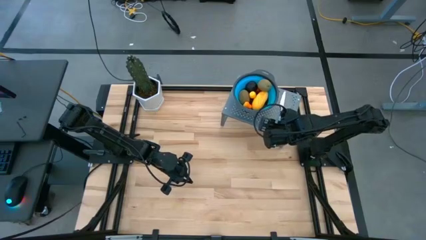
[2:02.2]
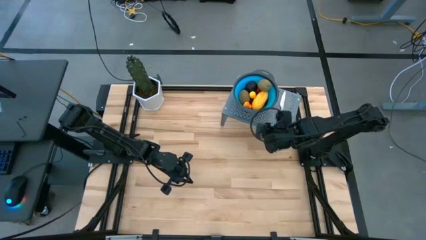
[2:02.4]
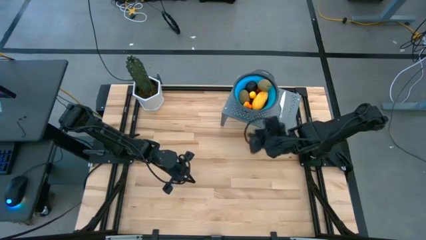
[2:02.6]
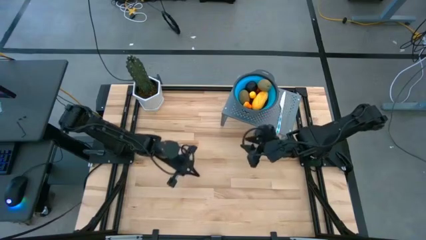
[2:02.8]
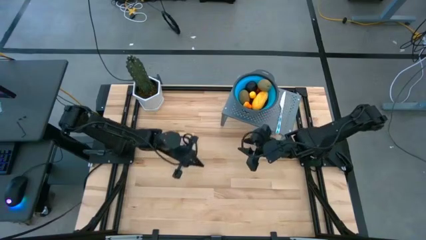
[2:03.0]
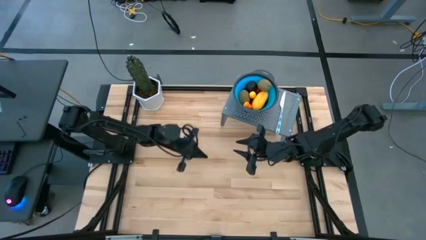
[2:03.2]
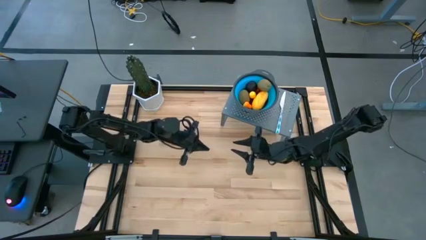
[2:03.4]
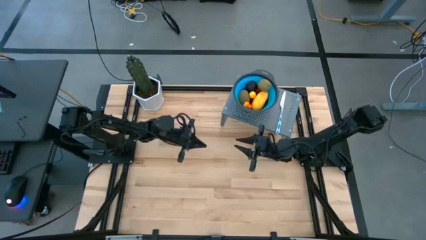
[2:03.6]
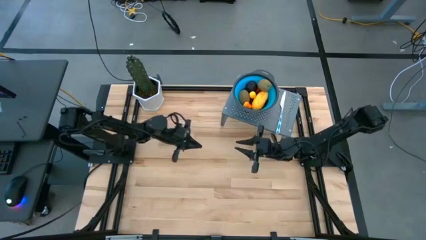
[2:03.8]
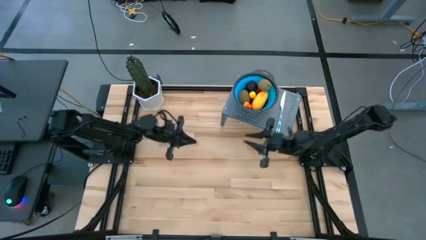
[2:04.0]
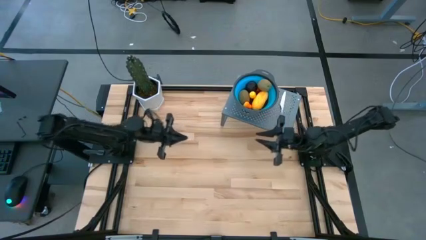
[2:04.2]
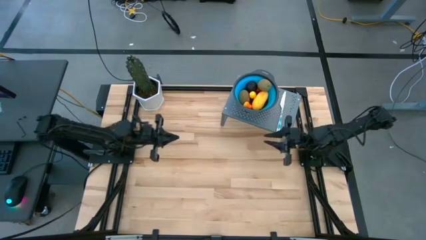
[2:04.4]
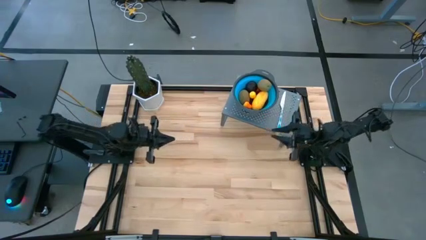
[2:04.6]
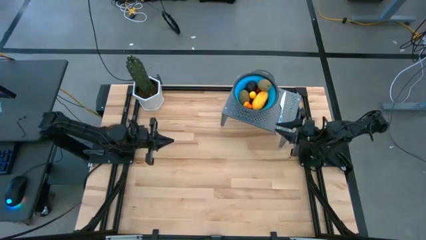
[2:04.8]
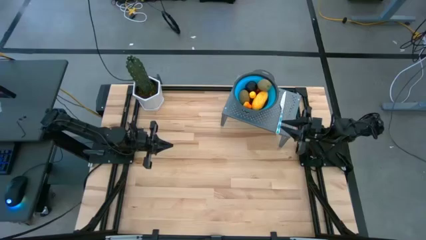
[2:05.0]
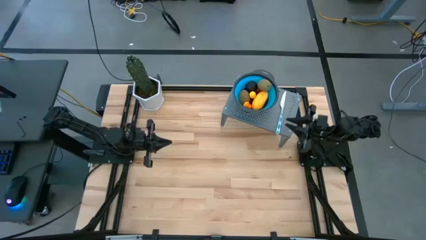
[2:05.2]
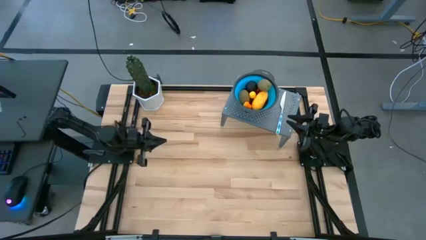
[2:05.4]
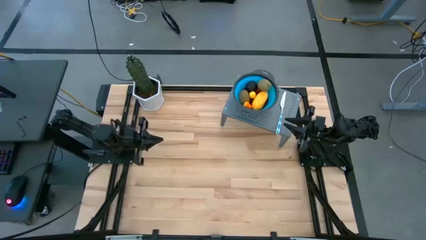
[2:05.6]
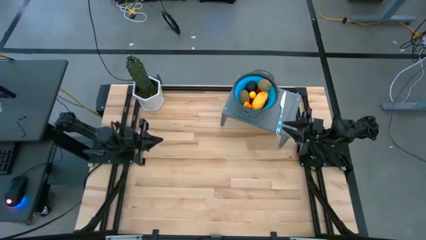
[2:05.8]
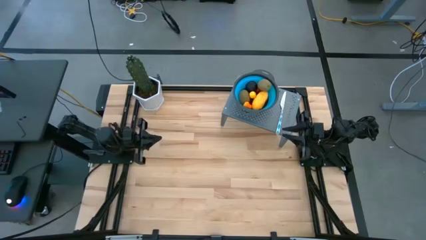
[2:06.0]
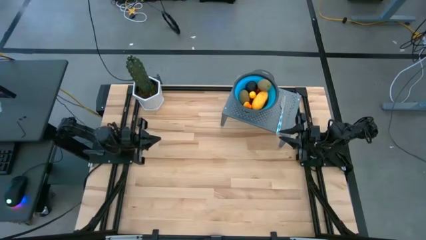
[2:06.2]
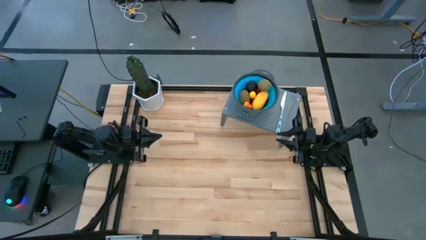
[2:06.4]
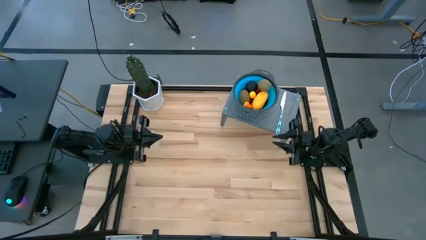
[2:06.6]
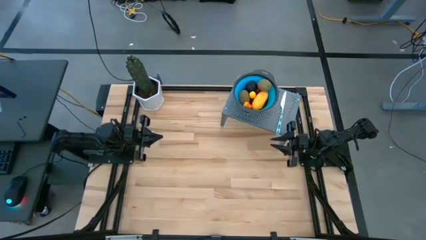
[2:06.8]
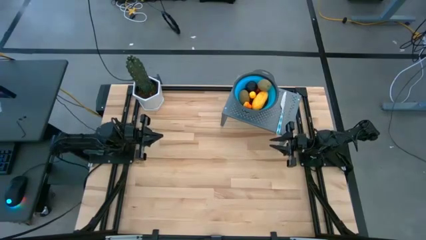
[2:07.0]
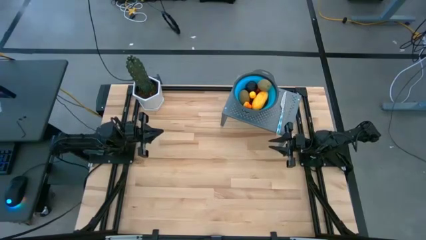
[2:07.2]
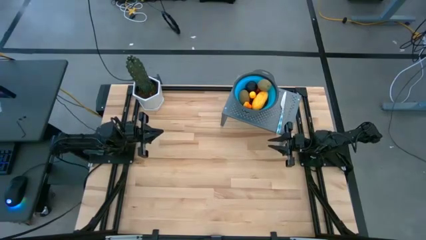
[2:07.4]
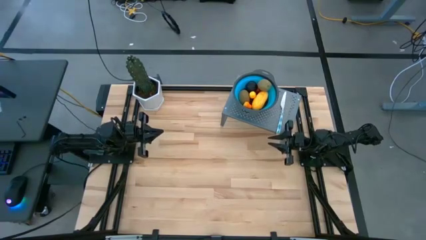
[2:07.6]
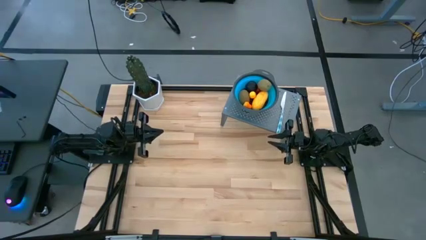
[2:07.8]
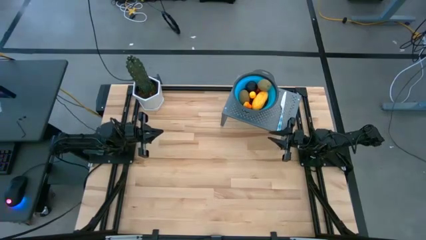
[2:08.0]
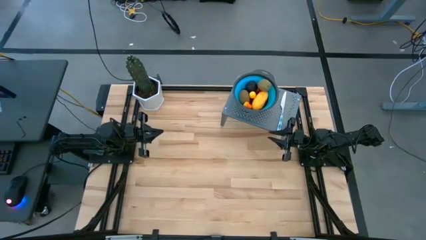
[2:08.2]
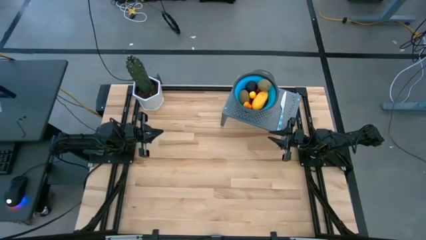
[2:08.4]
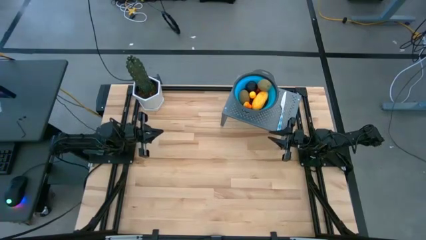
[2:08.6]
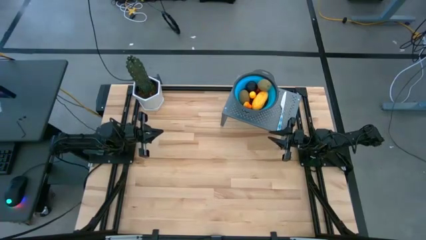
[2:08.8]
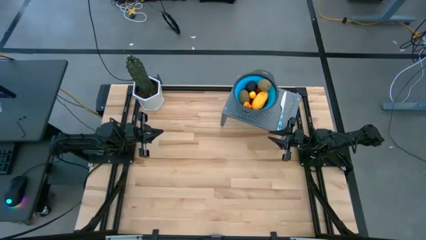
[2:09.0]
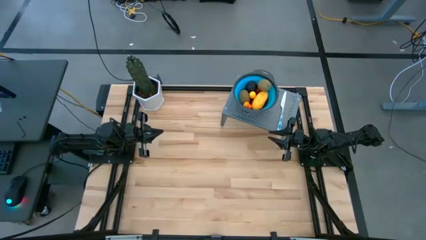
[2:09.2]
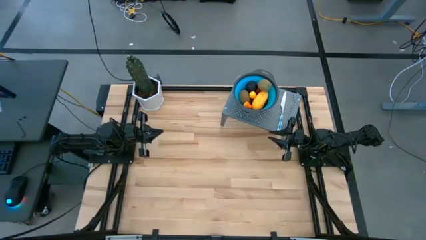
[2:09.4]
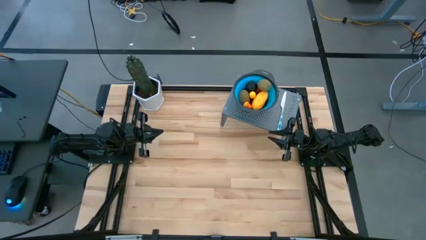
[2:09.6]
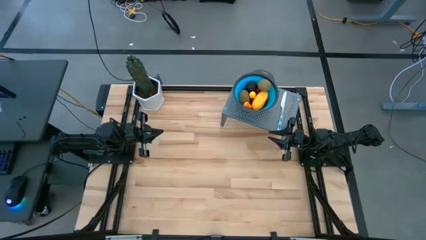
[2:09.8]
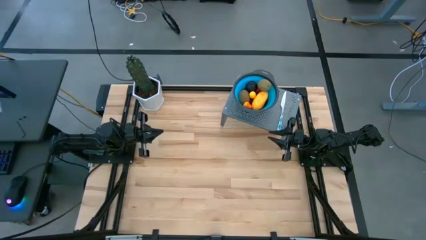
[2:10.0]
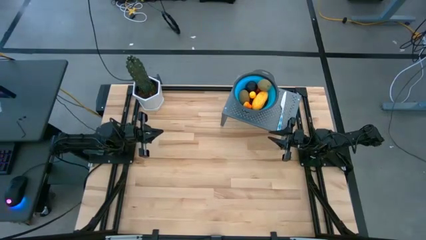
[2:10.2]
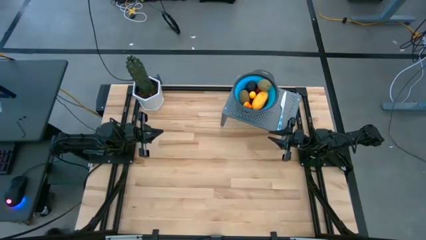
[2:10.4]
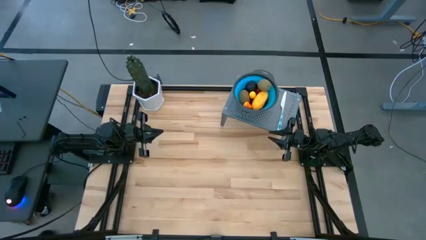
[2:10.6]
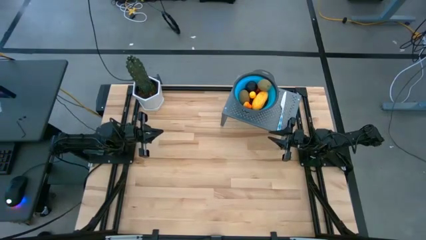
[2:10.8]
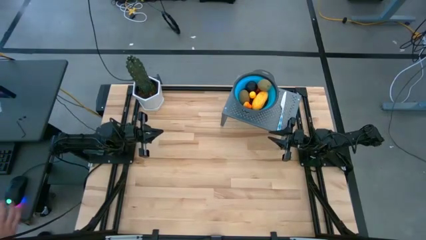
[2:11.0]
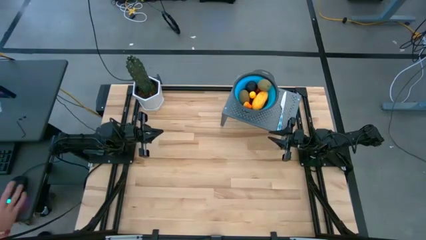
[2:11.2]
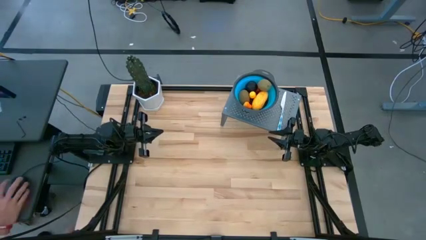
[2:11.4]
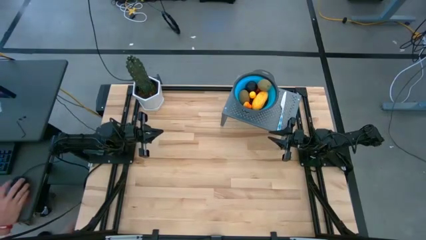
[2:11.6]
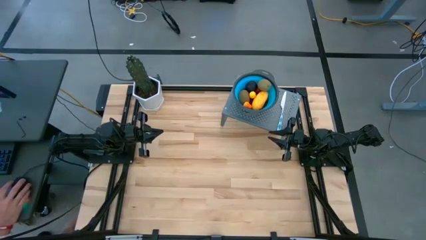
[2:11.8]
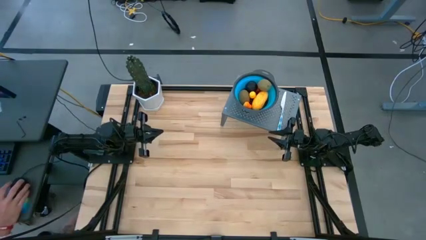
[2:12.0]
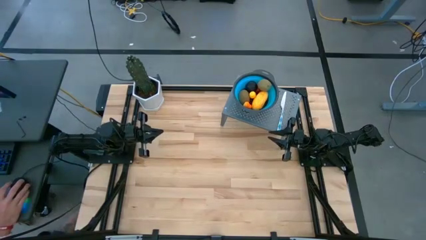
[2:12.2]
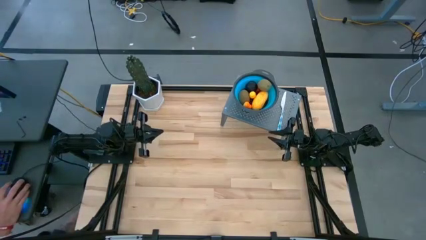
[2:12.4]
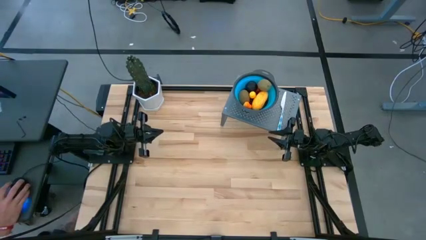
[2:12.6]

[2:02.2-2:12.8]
Task: Pick & Place Fruit
Return to Home Position

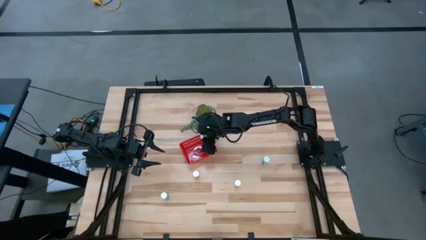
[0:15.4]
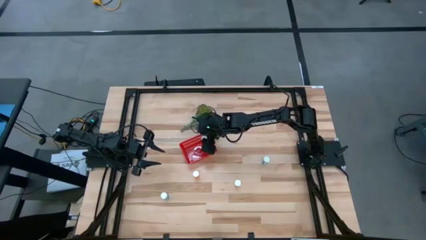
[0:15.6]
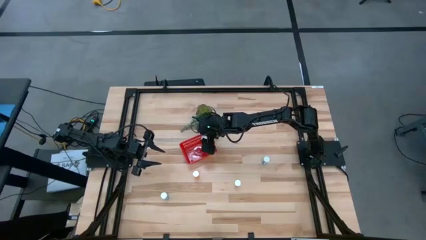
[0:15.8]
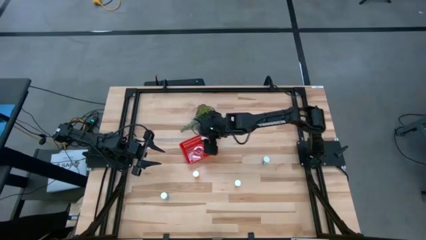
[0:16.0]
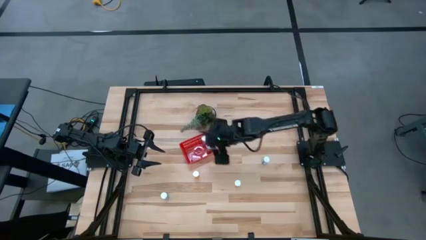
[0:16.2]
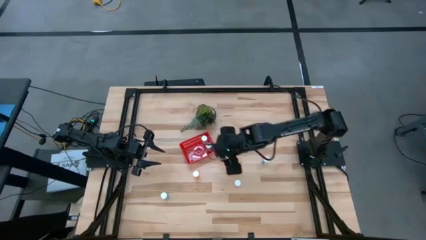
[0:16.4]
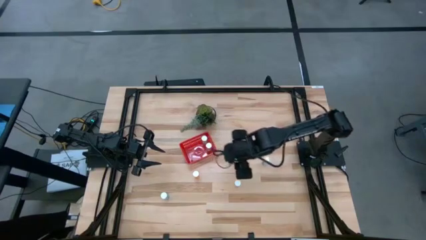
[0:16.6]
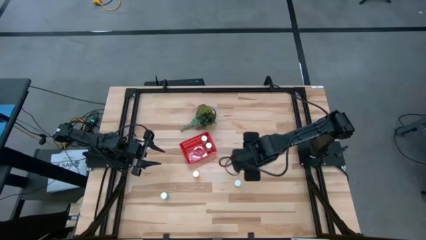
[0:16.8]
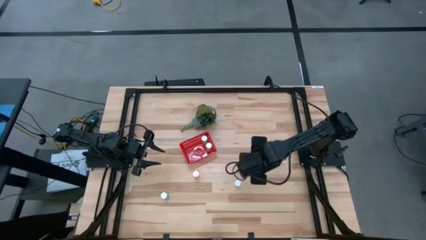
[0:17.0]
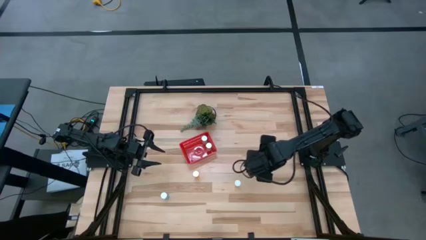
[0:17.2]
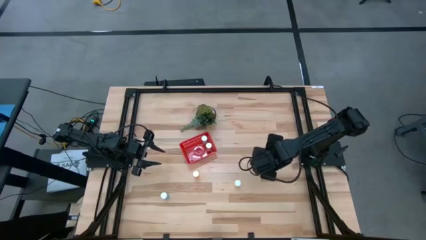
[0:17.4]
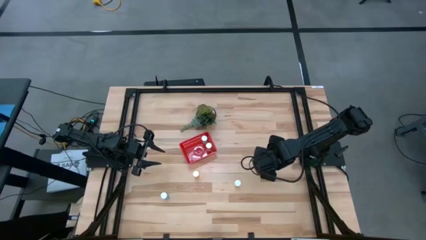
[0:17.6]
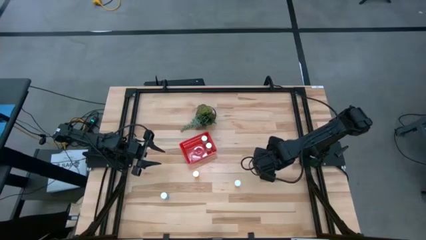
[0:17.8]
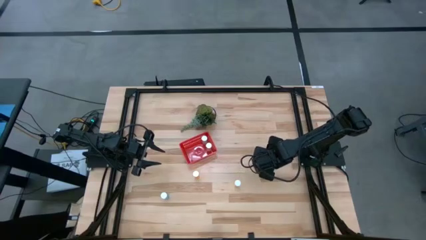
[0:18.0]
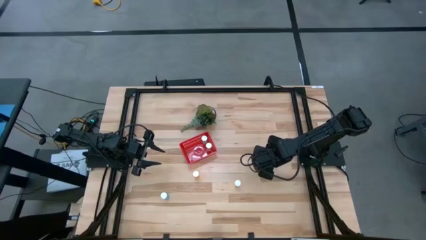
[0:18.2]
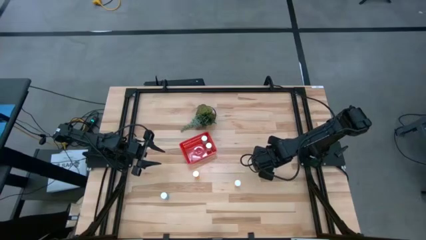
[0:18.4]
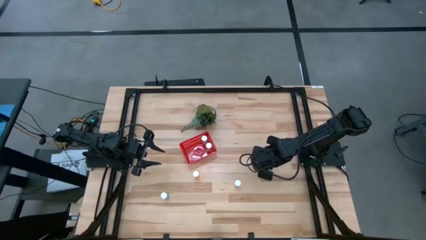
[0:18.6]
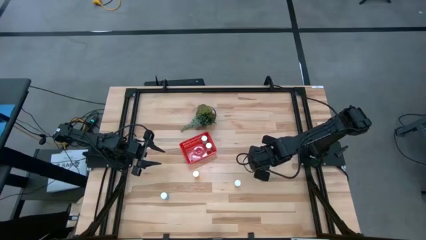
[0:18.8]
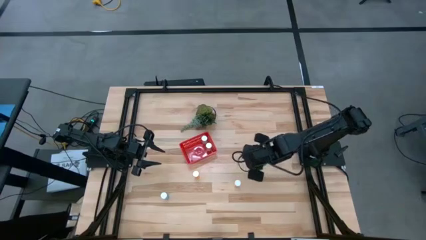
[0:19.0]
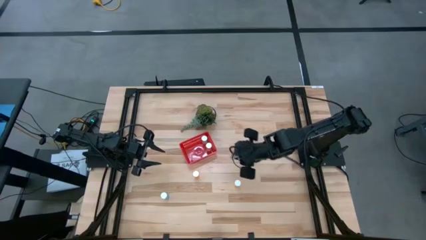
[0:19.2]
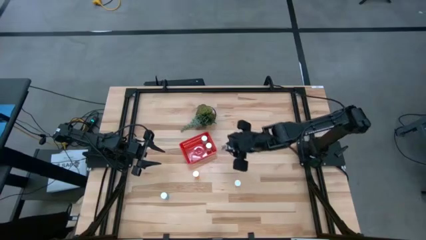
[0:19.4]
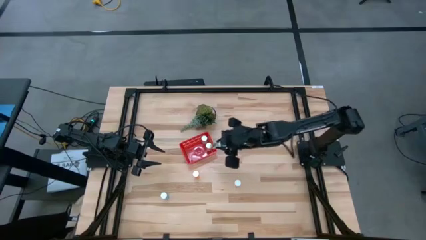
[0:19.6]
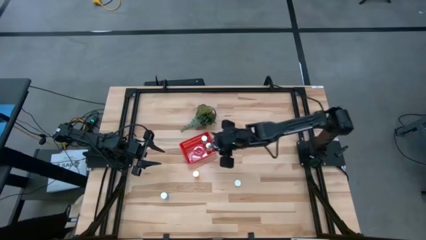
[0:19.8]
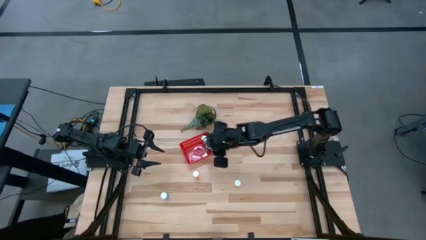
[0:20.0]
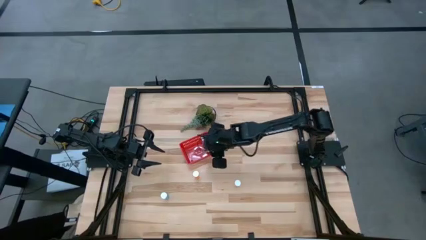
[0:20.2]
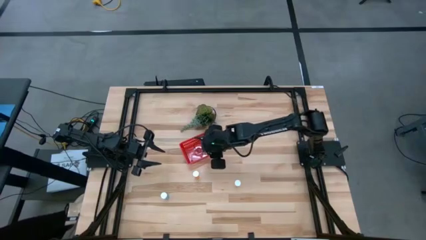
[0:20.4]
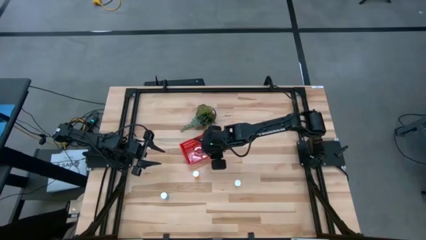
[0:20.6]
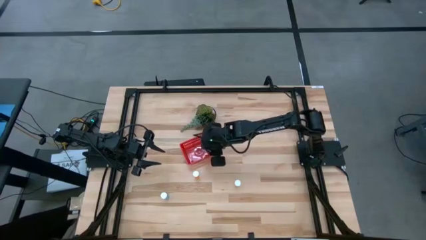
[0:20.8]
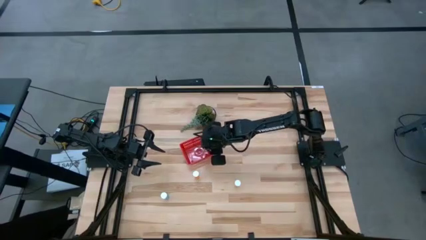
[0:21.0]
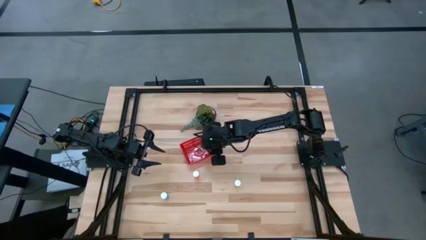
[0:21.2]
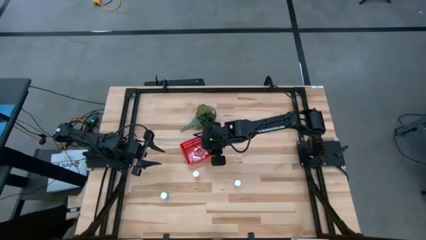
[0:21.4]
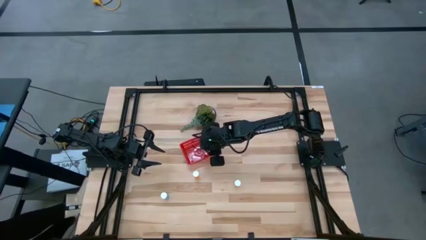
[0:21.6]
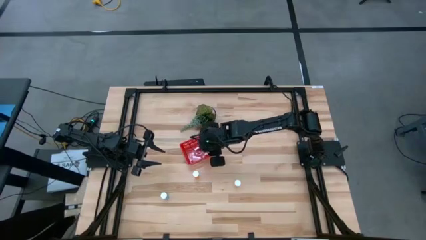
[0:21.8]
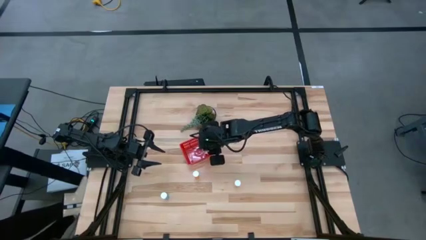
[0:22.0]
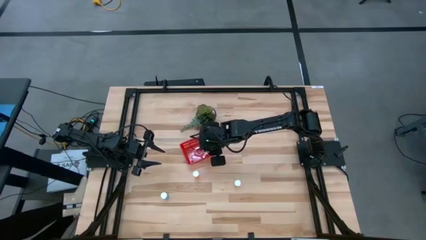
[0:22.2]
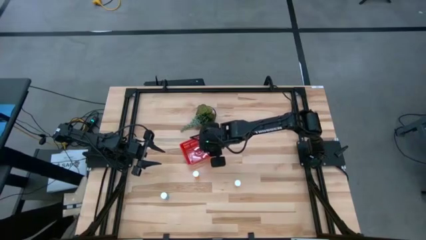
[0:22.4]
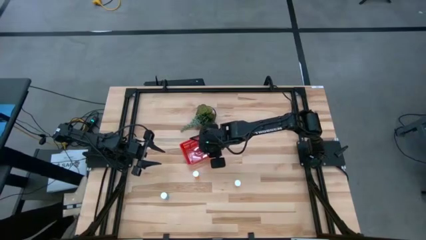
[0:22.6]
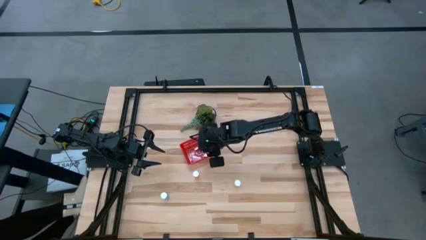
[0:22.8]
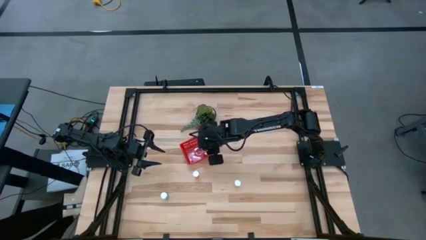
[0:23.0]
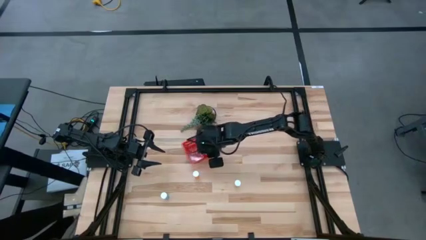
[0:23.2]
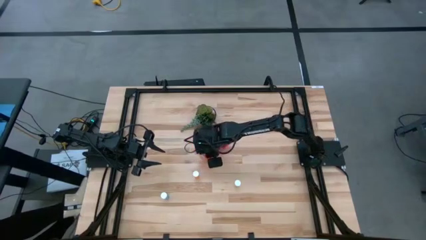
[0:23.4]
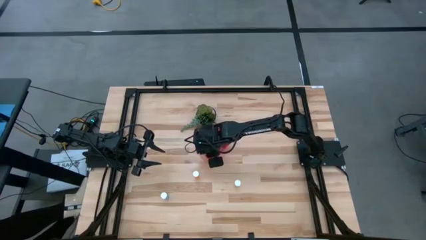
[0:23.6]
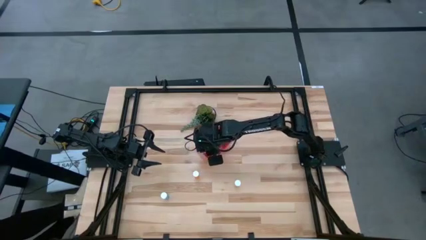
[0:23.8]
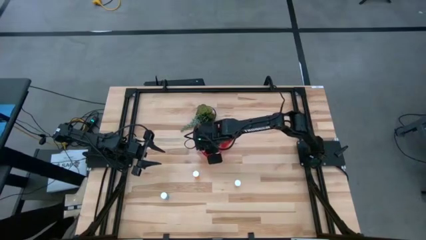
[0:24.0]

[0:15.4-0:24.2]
Task: Pick and place pill bottles into a basket
Put the right blue pill bottle into the red bin
